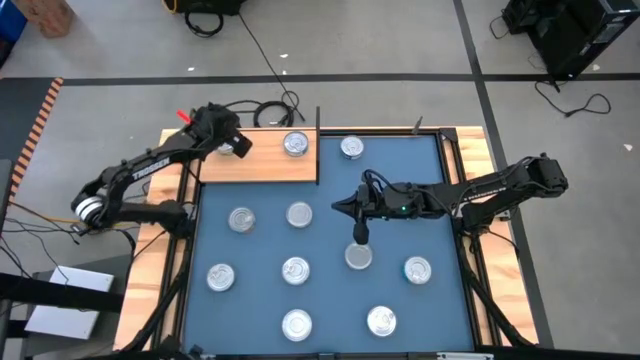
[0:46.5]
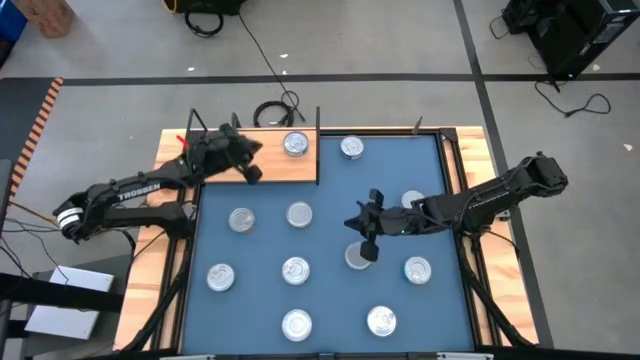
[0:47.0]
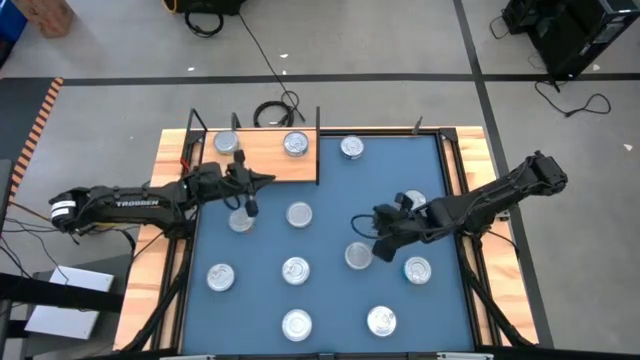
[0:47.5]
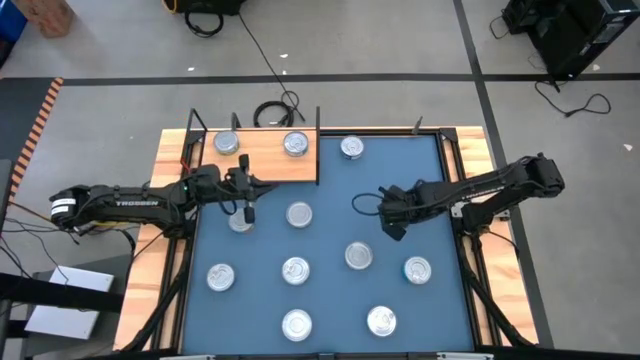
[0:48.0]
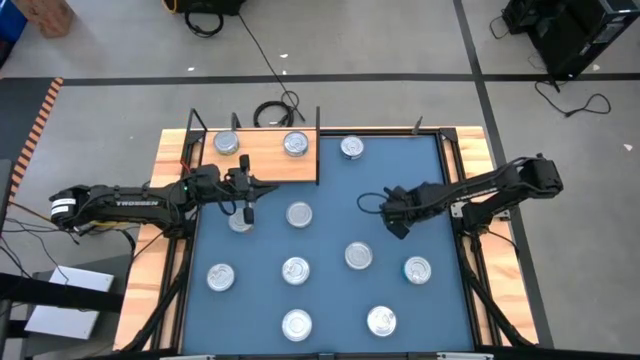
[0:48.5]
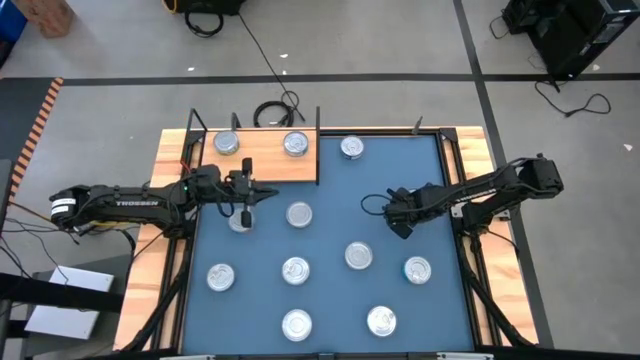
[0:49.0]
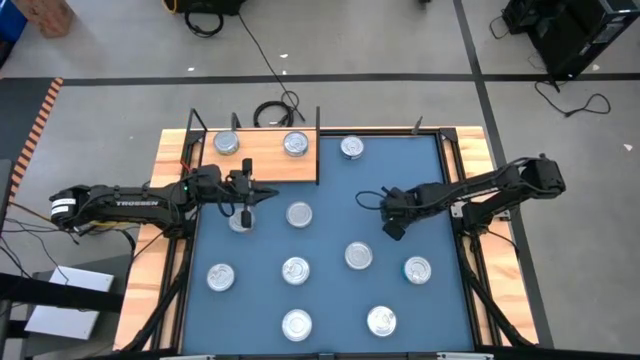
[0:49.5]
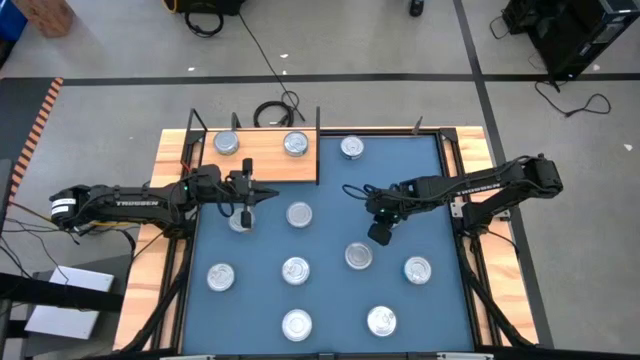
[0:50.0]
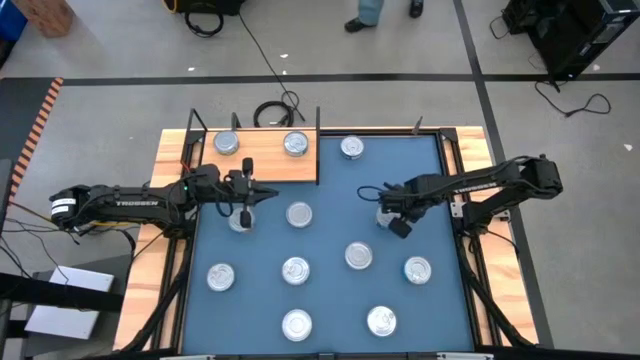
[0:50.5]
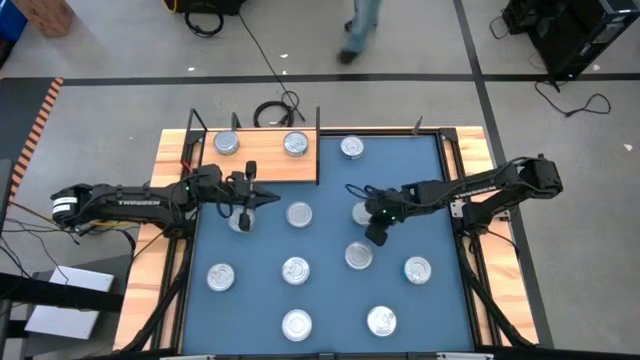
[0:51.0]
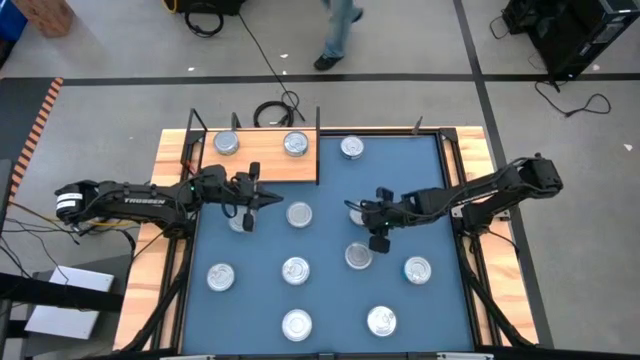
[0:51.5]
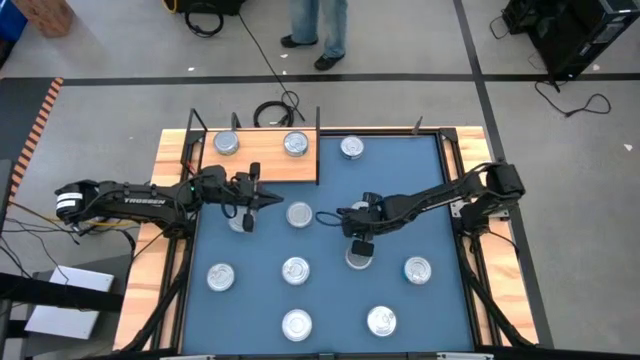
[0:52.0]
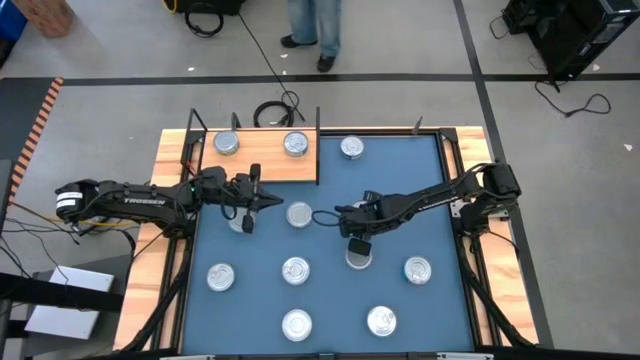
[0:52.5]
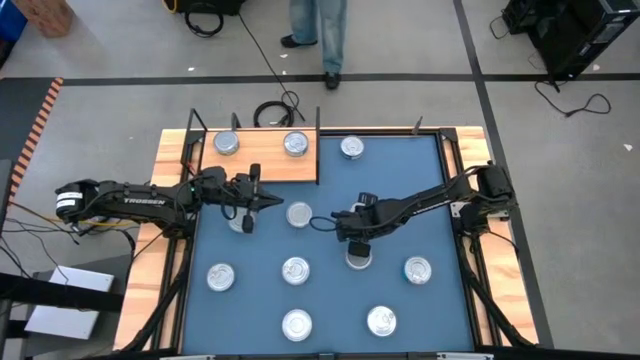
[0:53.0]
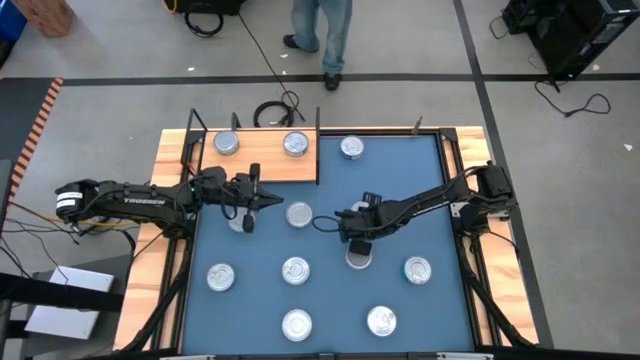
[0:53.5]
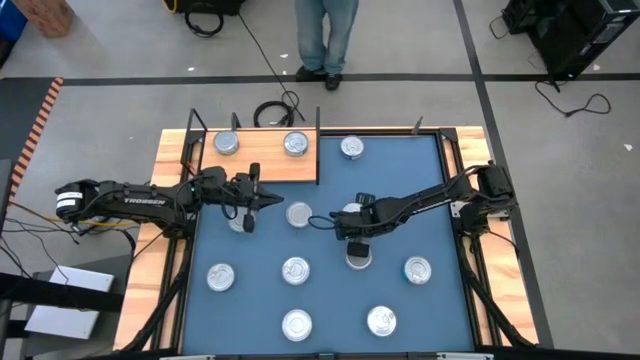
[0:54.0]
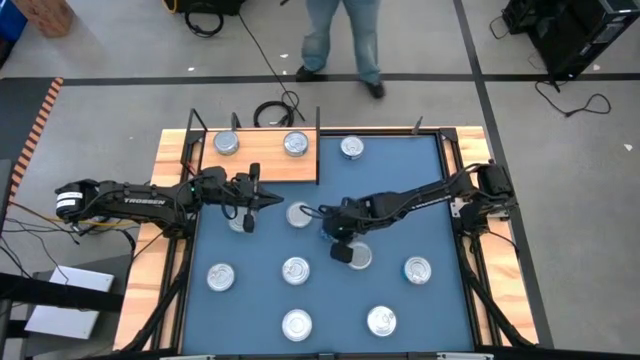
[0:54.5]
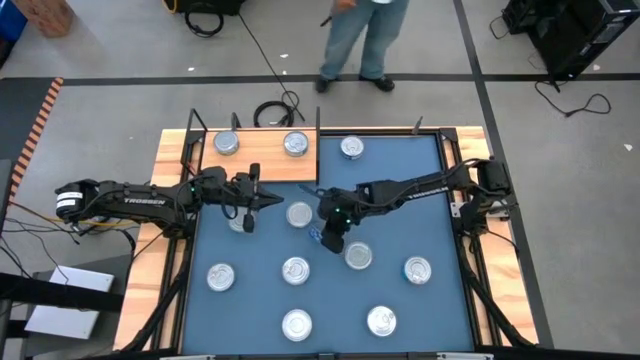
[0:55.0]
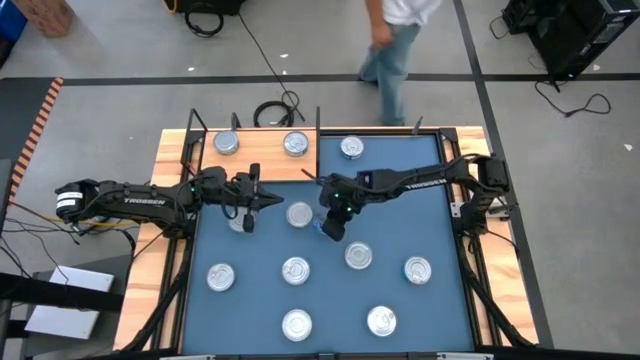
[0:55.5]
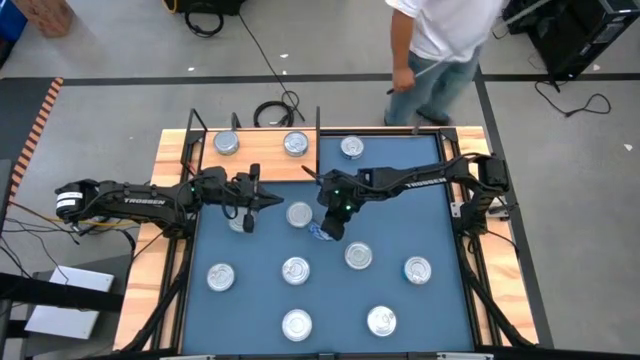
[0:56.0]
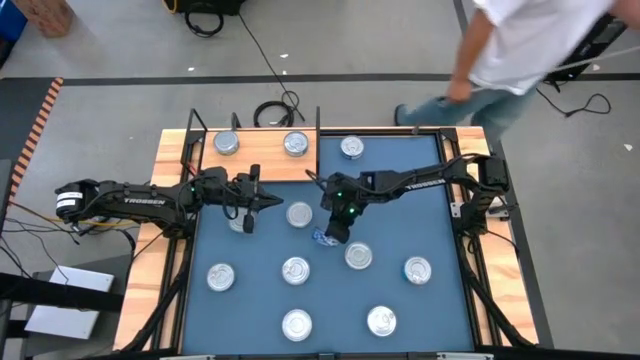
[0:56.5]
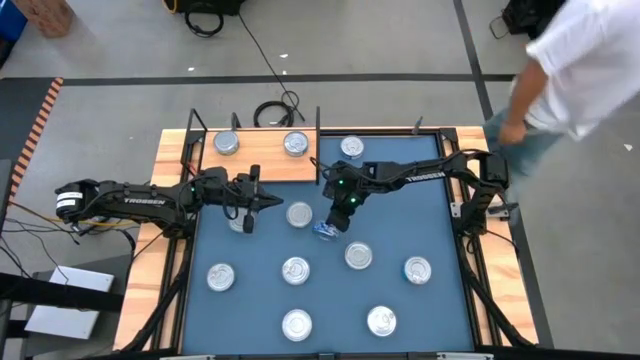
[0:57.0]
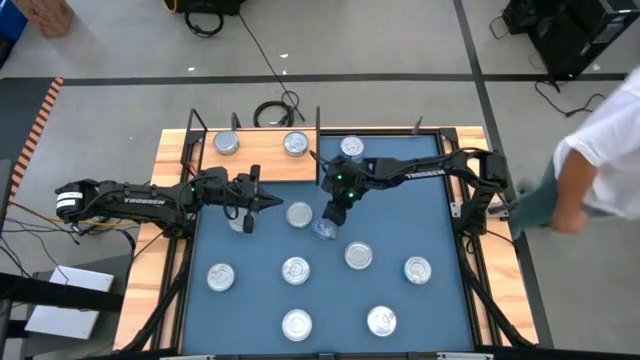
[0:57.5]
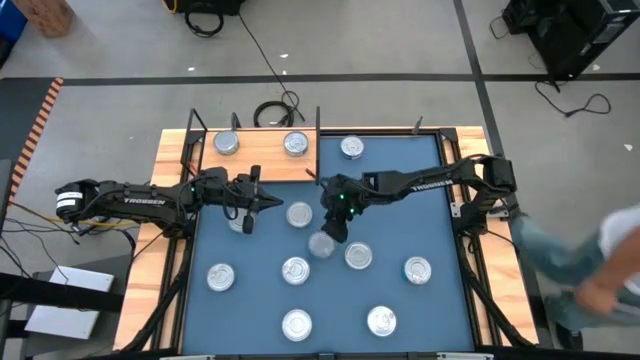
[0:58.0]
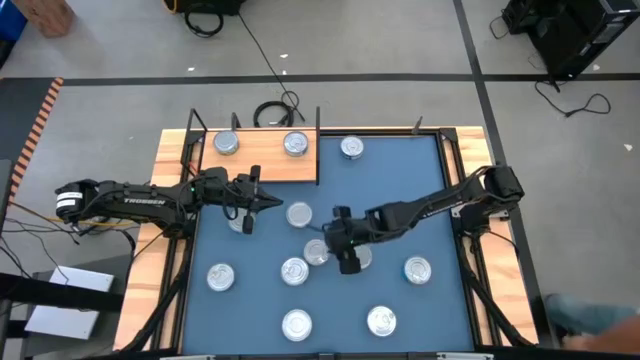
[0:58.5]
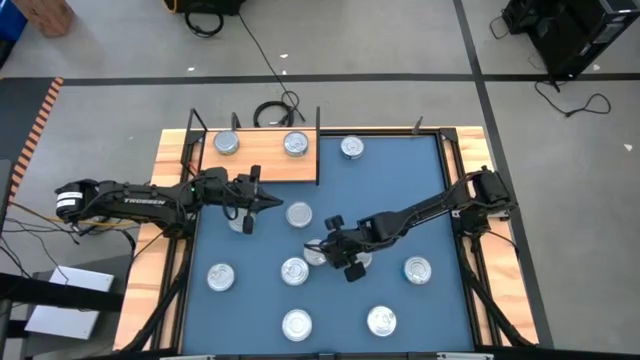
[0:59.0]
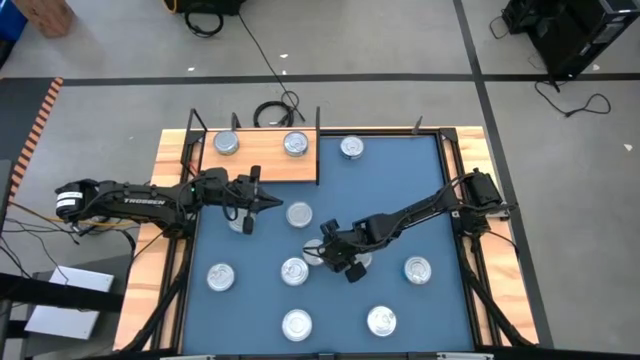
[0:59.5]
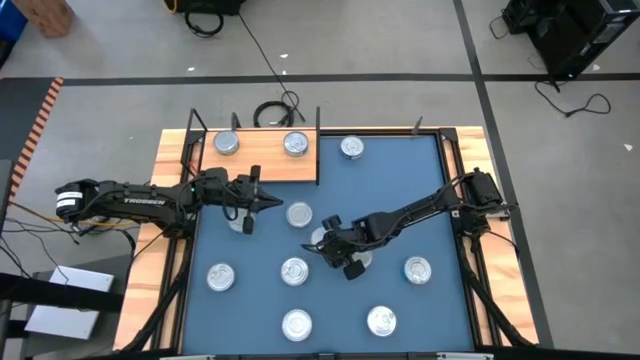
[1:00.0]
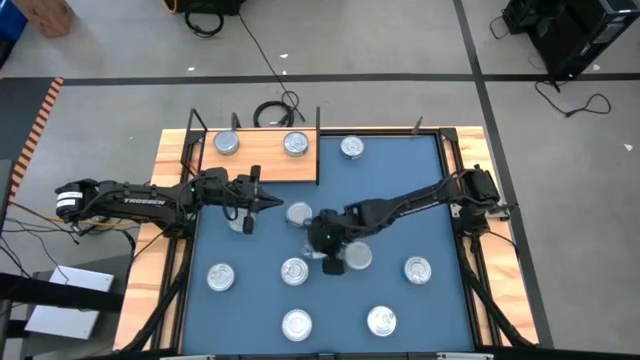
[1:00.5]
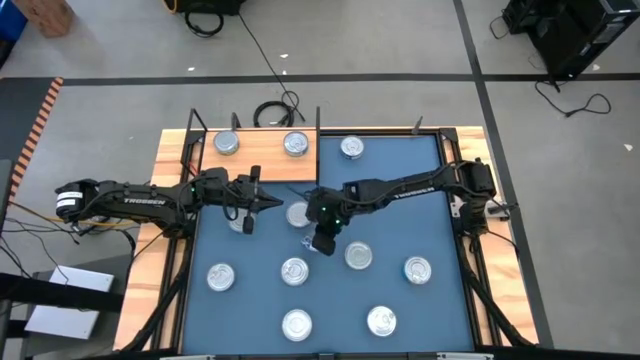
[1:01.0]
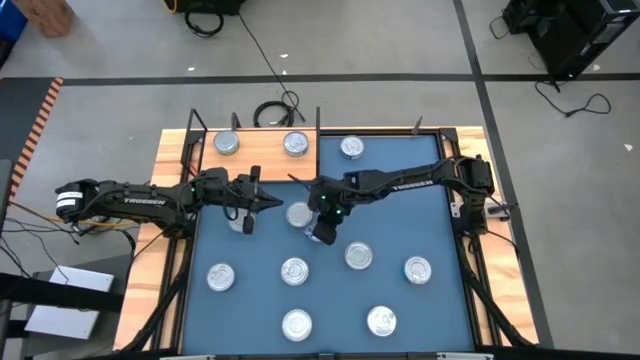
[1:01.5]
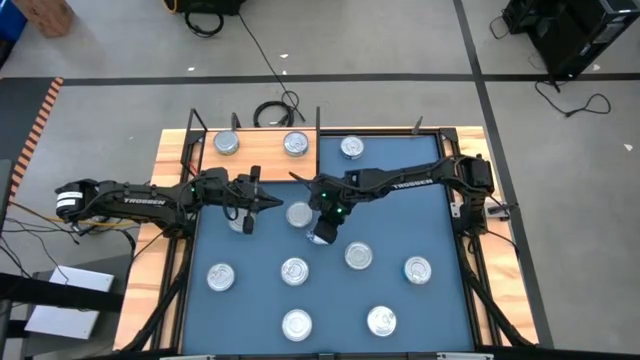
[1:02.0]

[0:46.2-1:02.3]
Task: Stack canned seafood by type on shelf
Put the blue tuna can on the shelf
